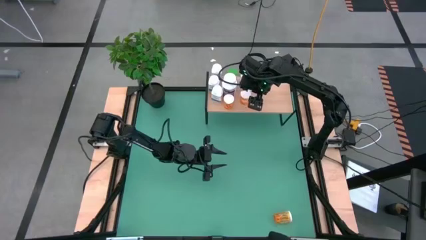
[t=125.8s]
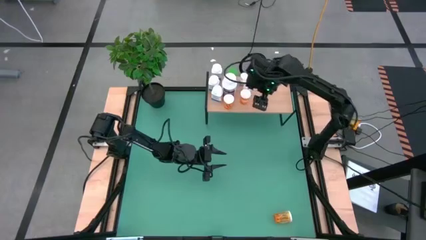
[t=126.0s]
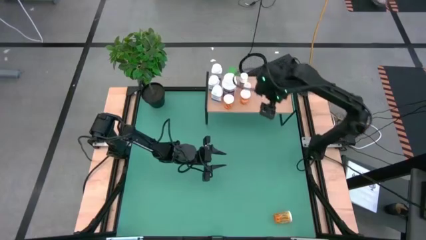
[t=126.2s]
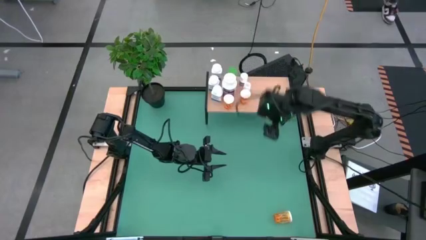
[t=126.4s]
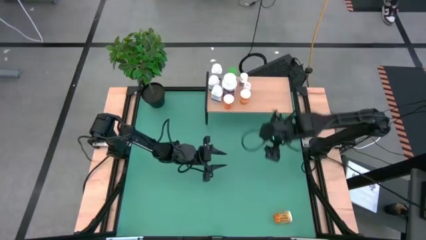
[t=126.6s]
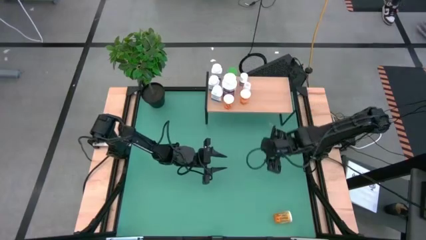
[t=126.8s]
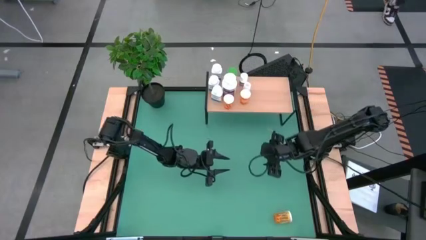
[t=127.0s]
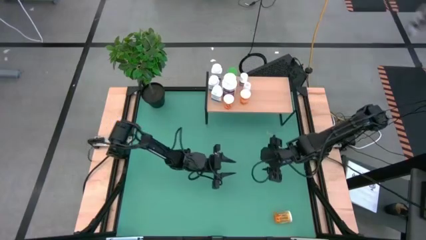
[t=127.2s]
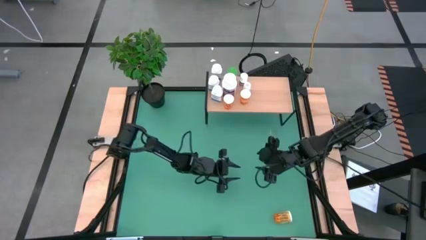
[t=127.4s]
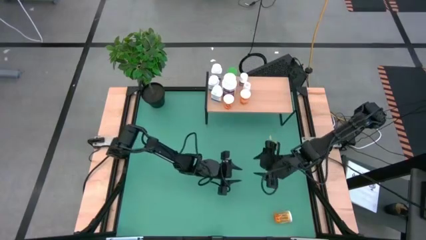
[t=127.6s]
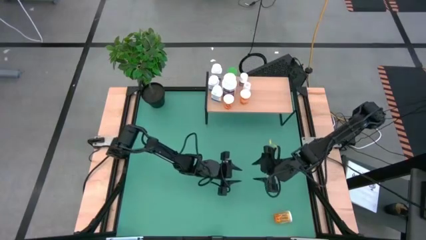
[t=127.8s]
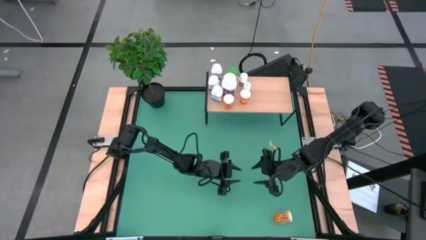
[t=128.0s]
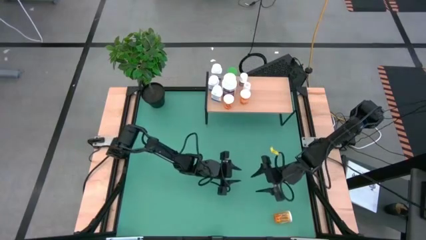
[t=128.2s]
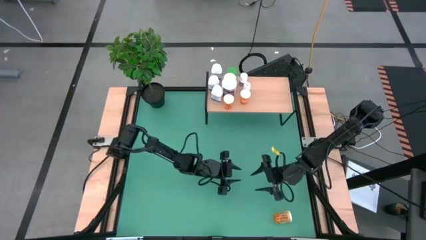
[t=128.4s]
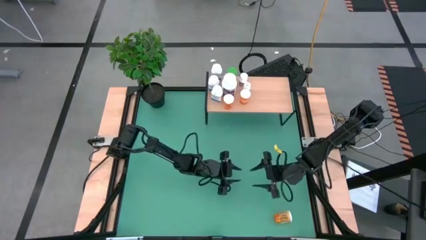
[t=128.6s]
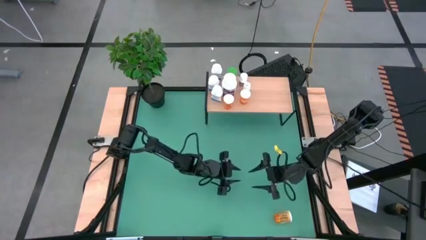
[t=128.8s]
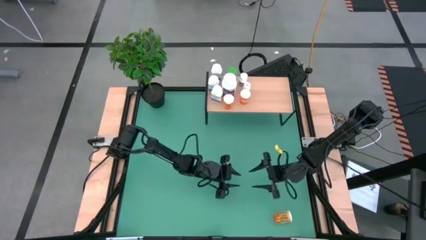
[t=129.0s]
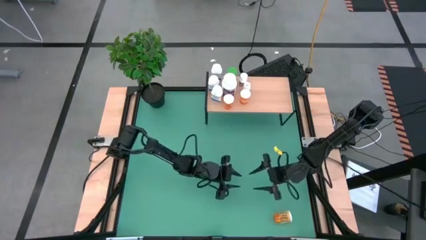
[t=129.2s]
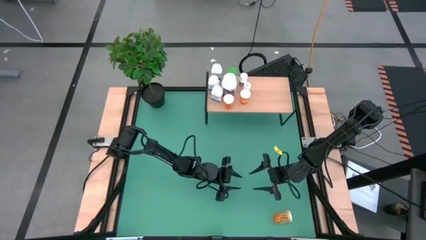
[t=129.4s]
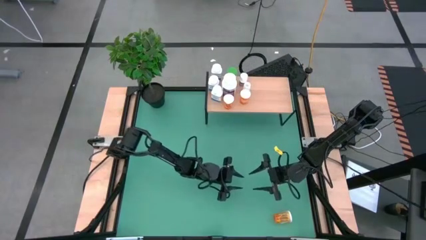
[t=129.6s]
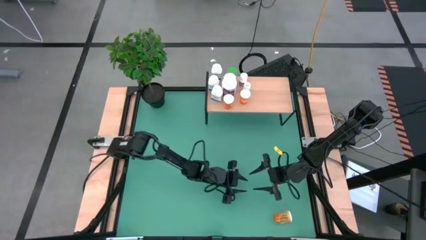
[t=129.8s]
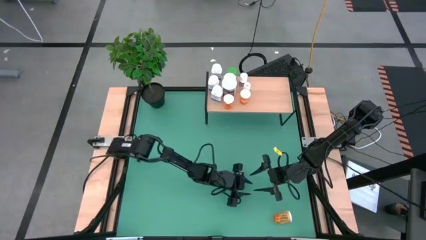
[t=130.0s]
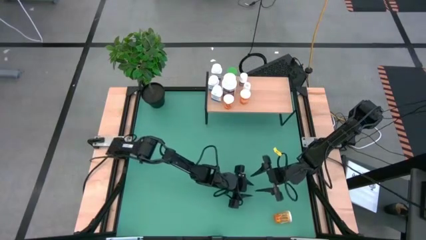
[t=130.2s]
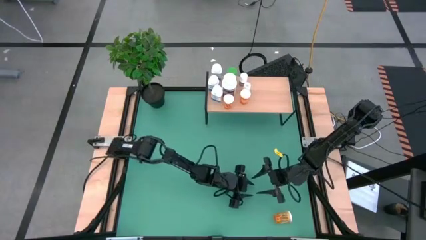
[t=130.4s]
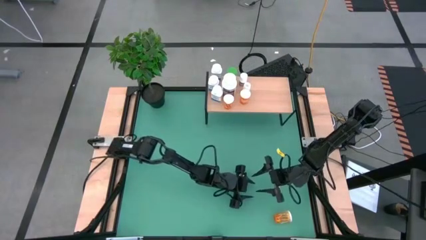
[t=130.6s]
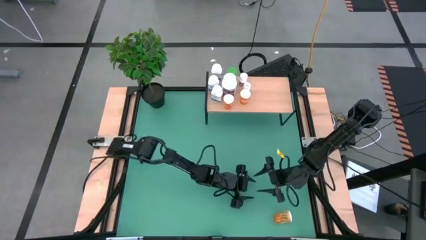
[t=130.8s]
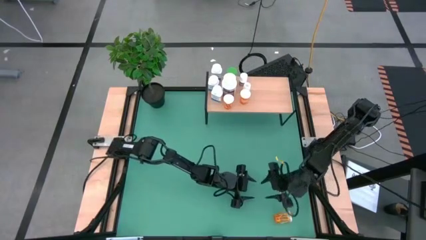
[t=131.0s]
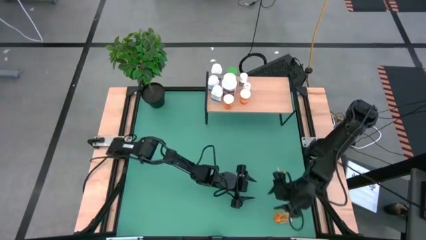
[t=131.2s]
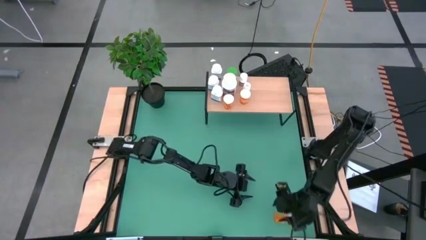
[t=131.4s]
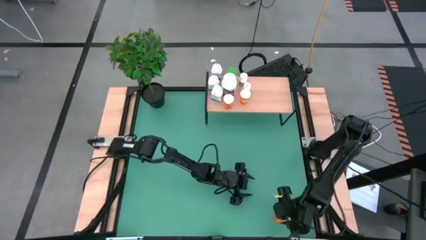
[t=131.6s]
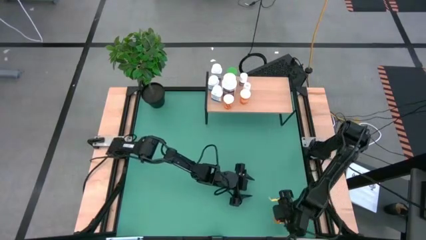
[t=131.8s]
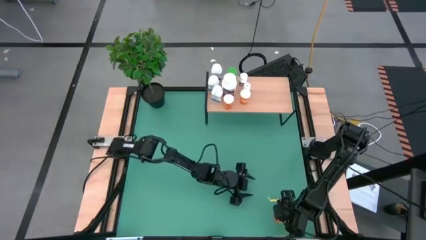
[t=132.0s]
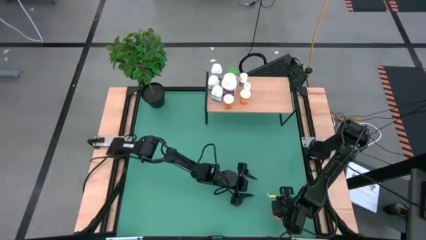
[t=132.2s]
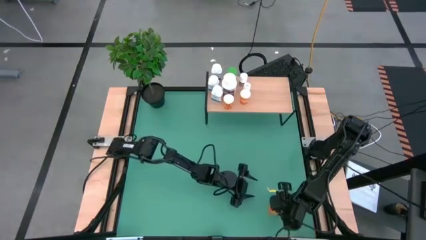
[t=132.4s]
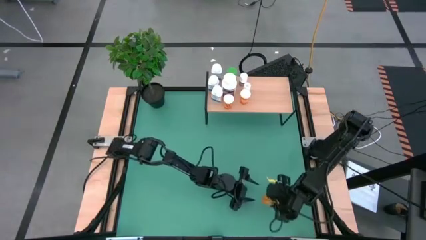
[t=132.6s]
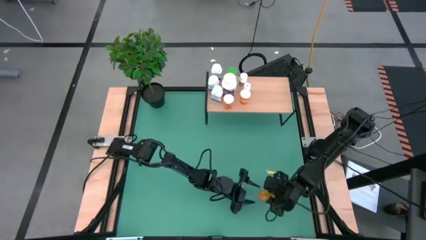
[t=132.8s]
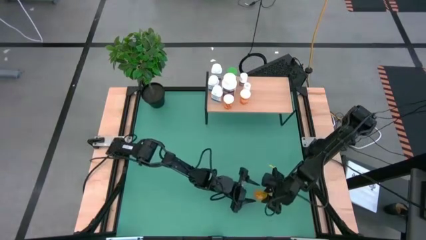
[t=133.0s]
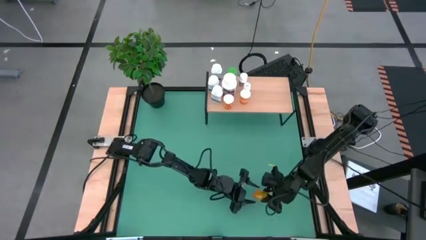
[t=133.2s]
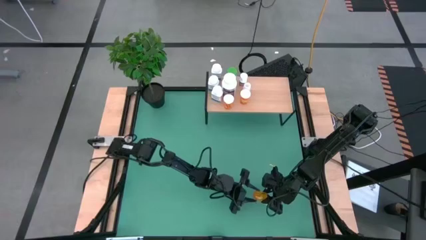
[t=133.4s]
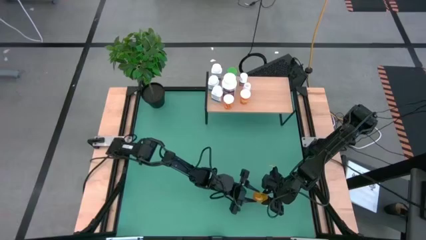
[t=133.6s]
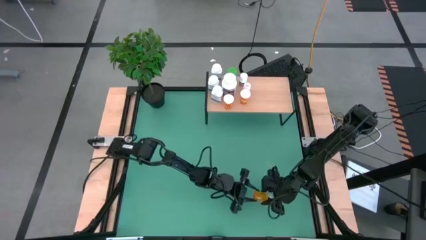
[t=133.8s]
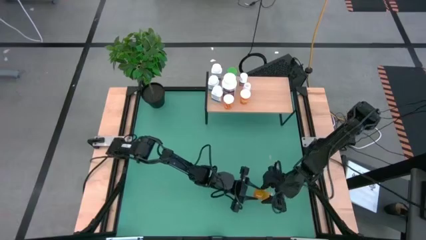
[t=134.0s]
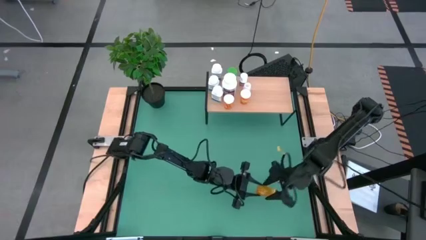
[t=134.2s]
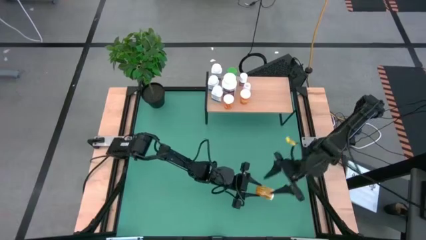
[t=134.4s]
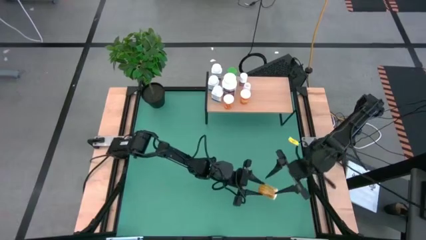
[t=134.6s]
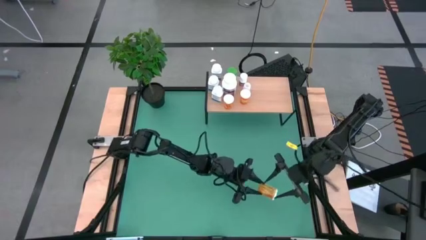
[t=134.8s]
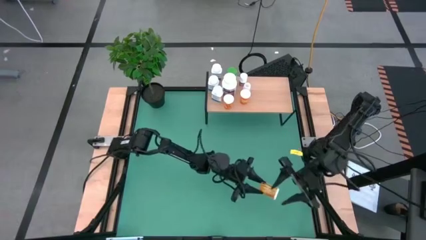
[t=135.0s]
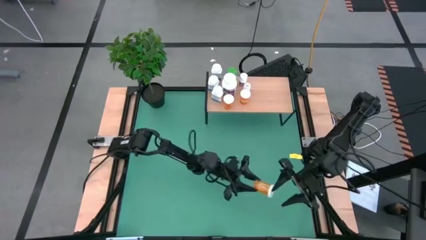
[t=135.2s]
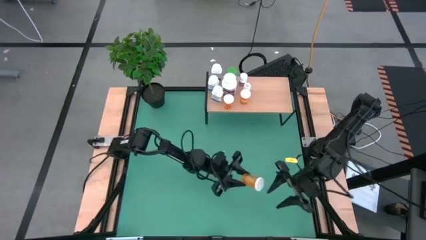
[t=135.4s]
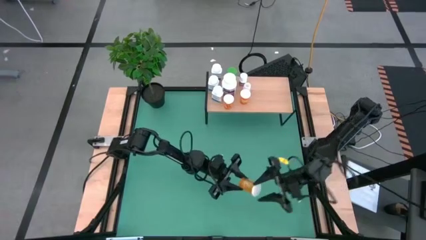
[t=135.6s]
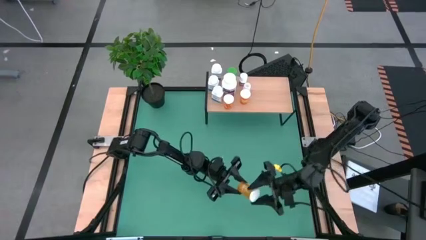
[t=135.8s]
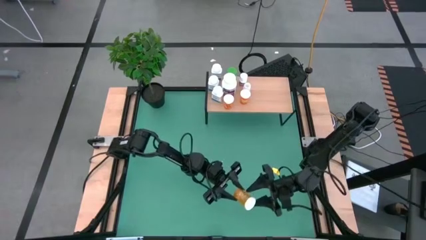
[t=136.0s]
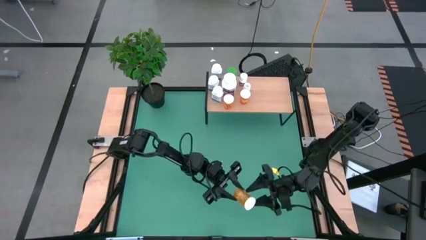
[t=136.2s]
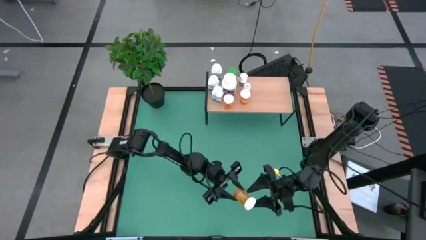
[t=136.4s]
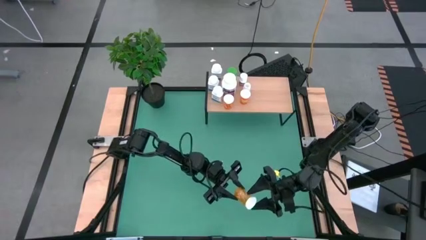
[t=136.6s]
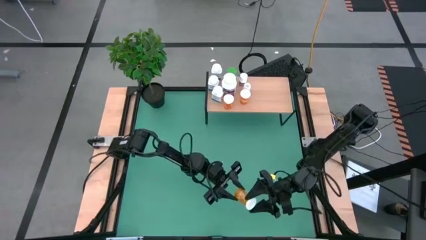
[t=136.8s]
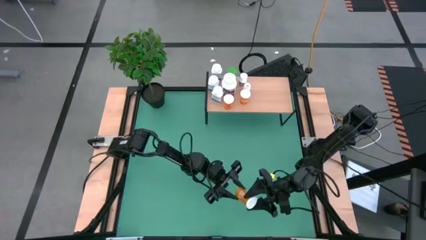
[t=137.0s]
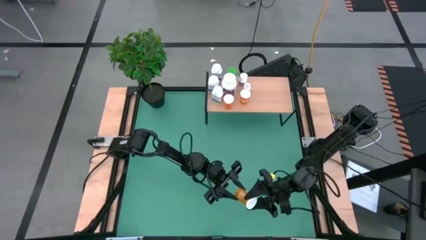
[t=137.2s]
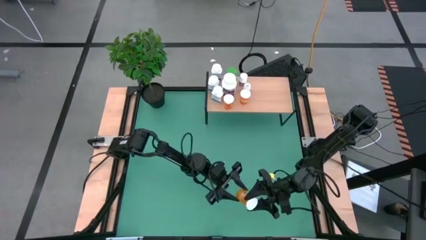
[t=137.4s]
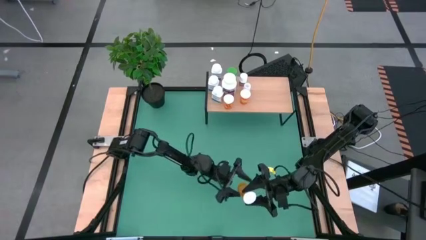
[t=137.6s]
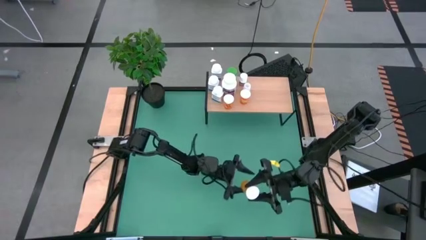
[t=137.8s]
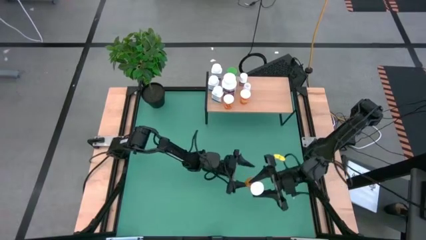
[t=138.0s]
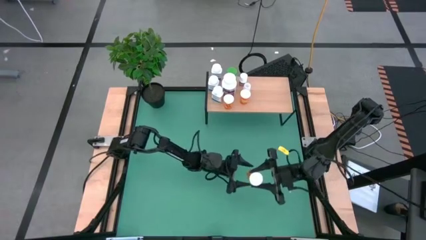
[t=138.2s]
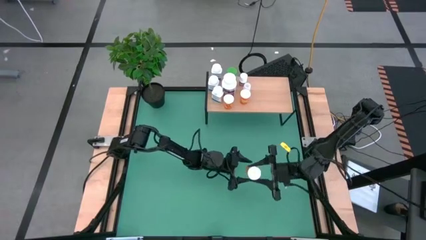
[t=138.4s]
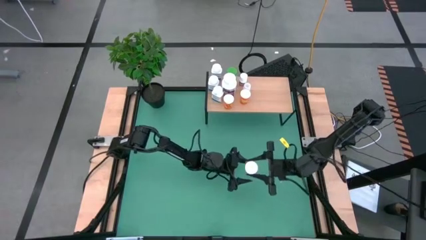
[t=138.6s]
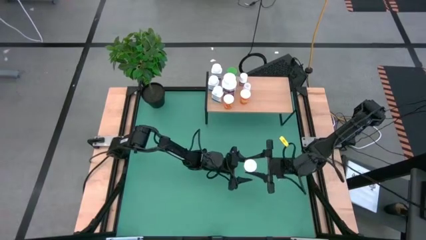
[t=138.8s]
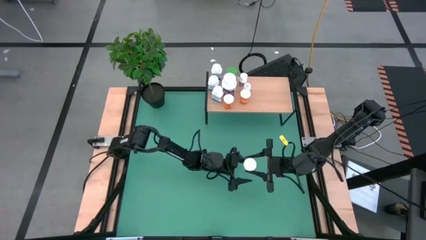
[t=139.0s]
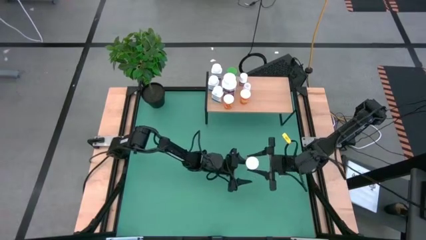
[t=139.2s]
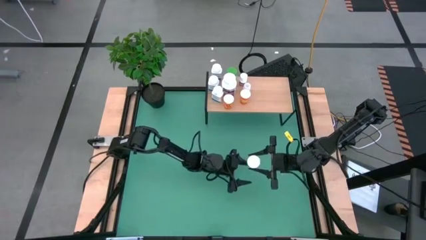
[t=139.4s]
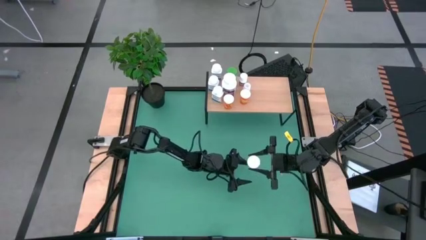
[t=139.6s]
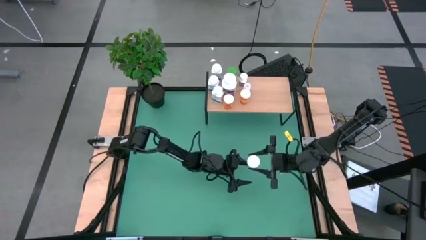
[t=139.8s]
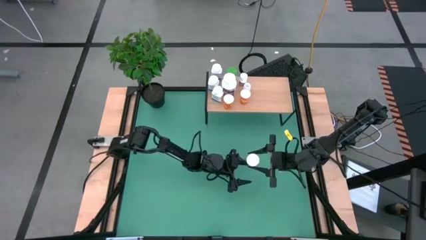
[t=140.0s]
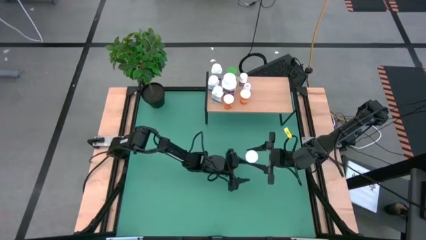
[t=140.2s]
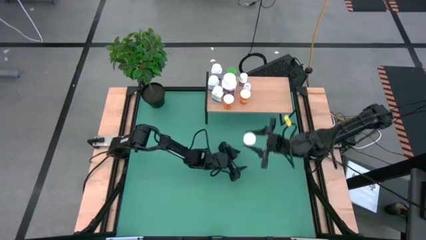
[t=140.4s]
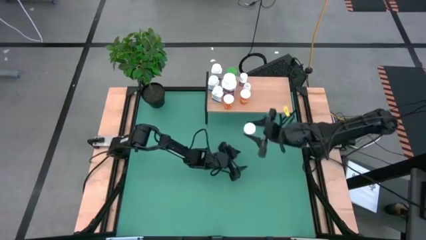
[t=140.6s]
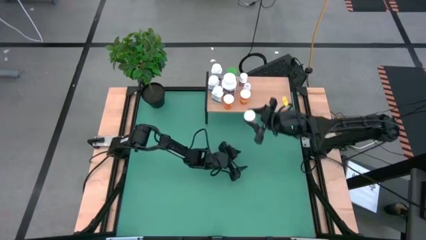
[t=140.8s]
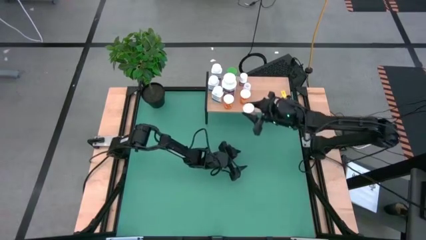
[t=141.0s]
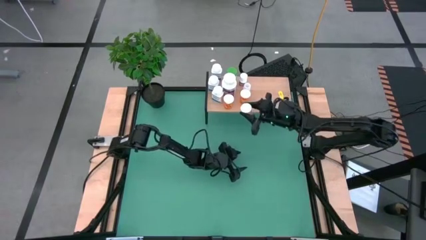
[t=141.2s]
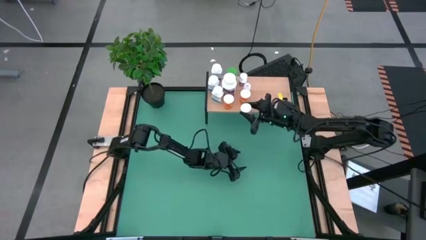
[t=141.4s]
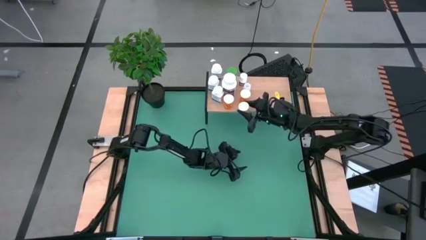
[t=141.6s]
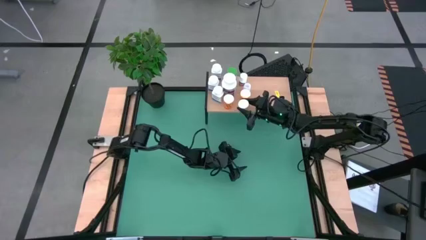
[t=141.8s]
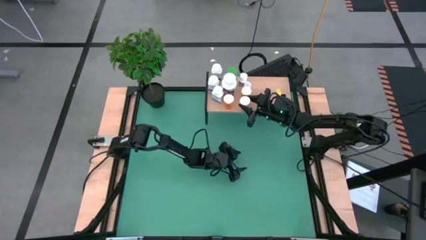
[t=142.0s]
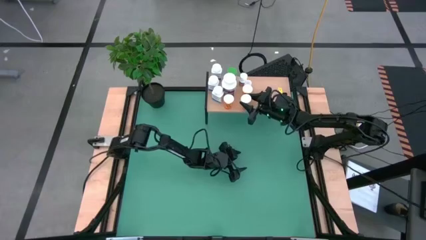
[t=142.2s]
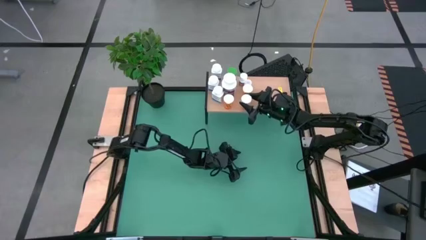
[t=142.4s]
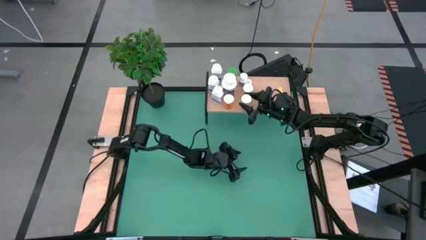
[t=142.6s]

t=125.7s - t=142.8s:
Task: Pick and place medicine bottles onto shelf by color
Put the big orange pill bottle on the shelf
